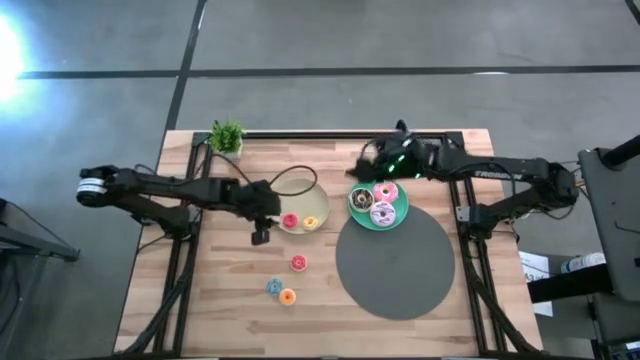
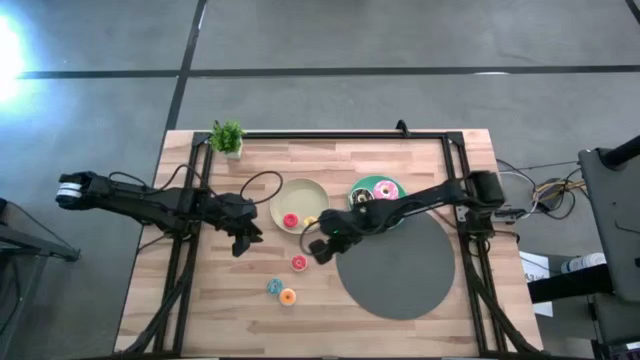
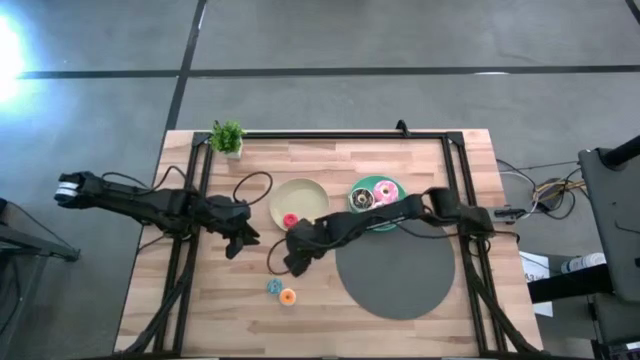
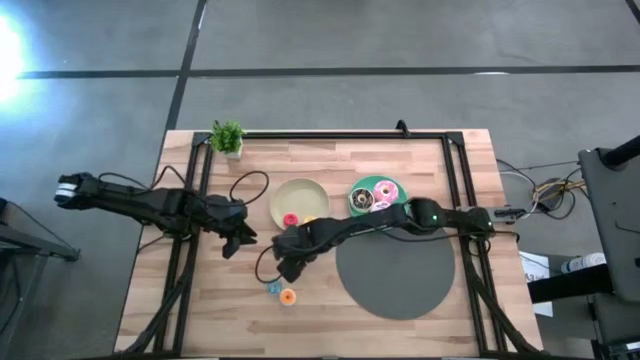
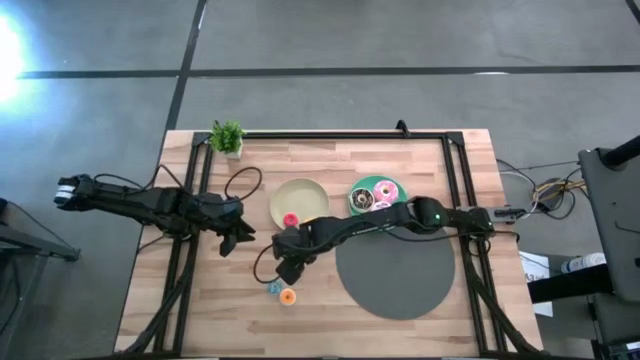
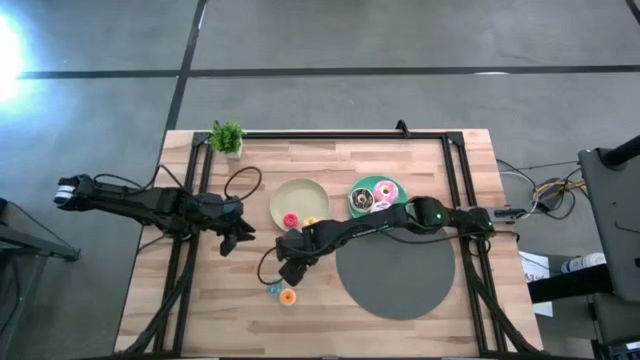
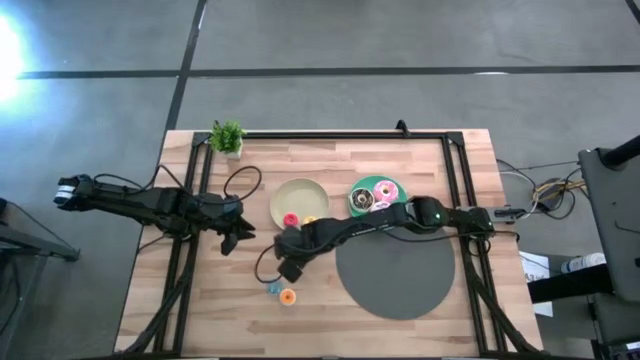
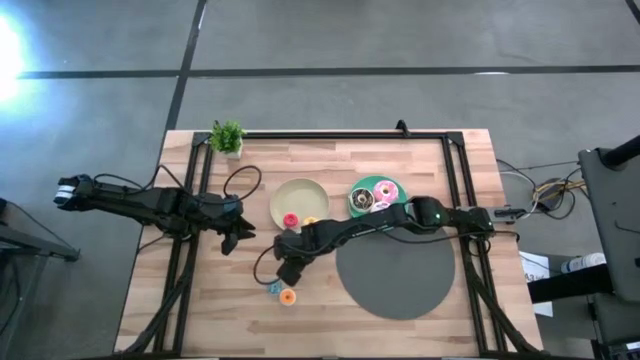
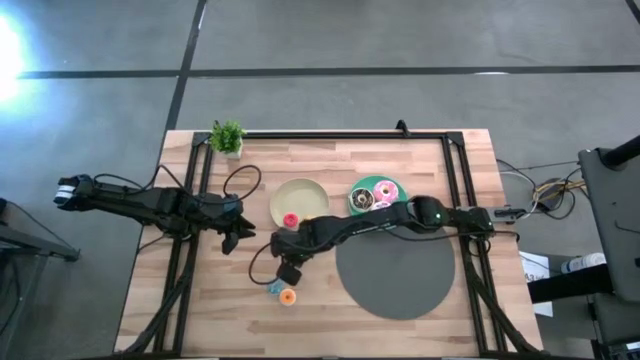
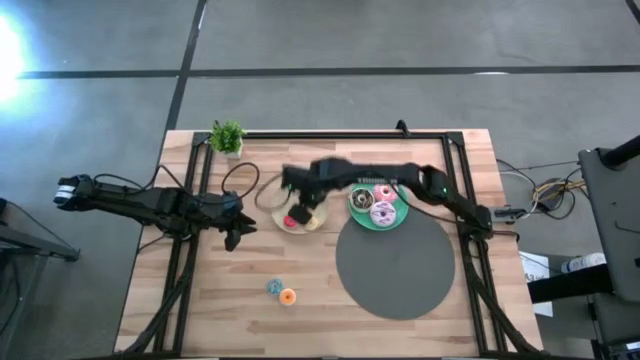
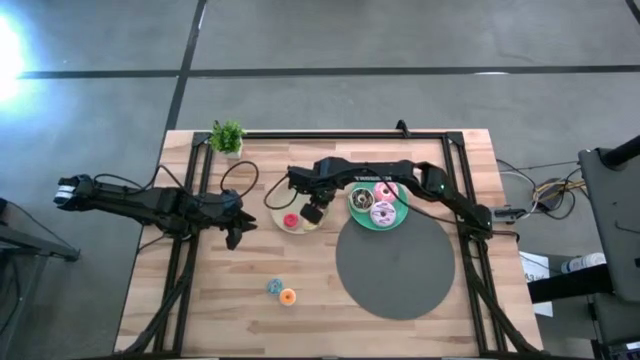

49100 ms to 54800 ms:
Task: Pick & Place donuts
Put the small orange donut on the white plate

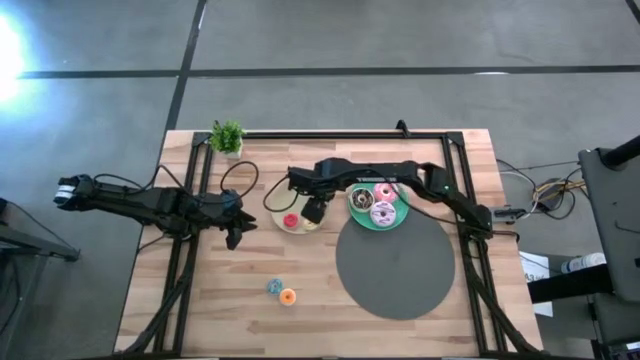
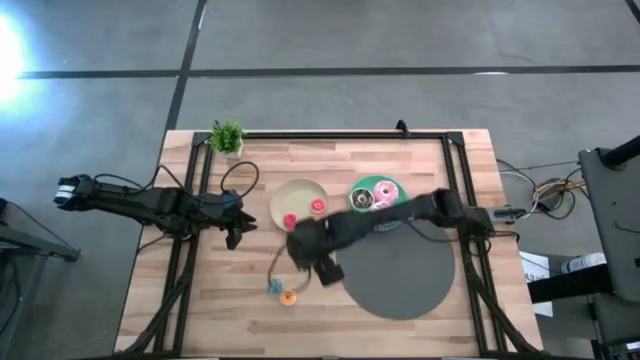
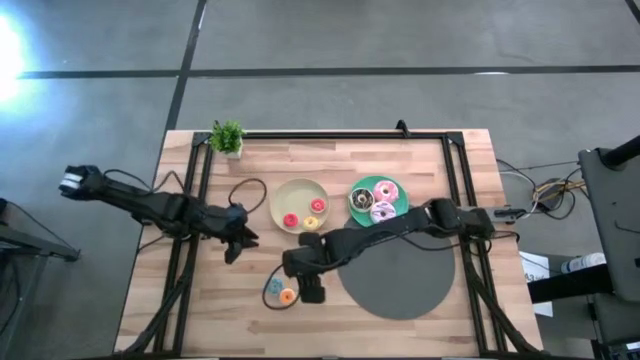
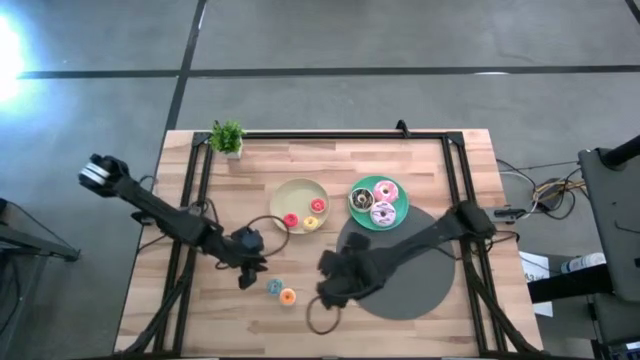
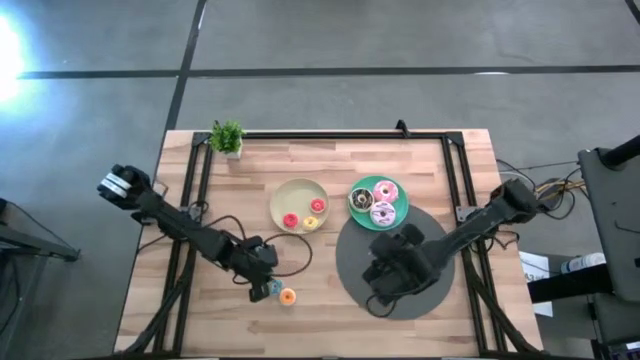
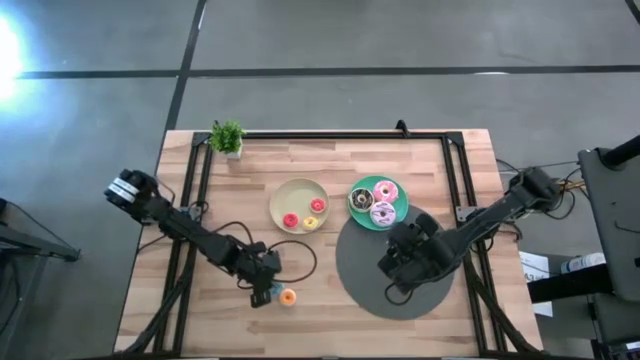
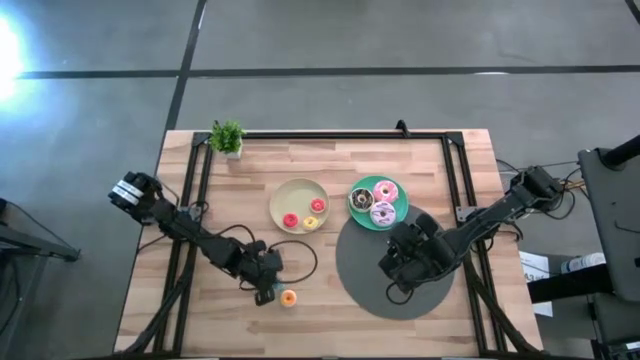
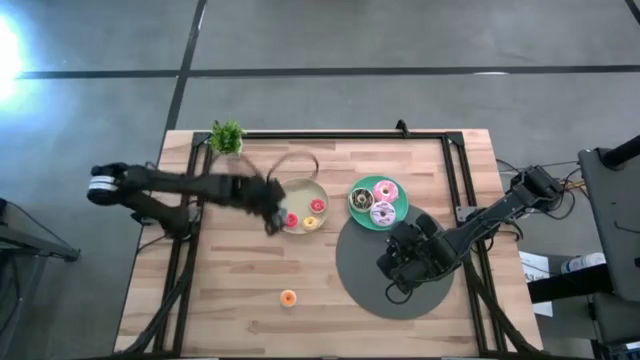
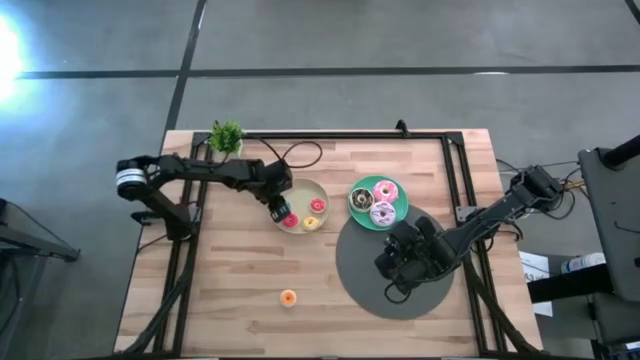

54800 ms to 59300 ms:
Put the small blue donut on the white plate

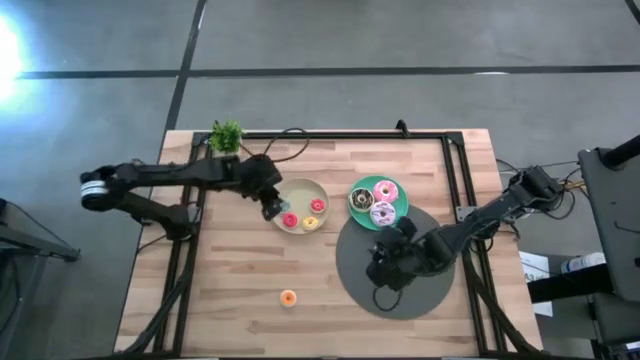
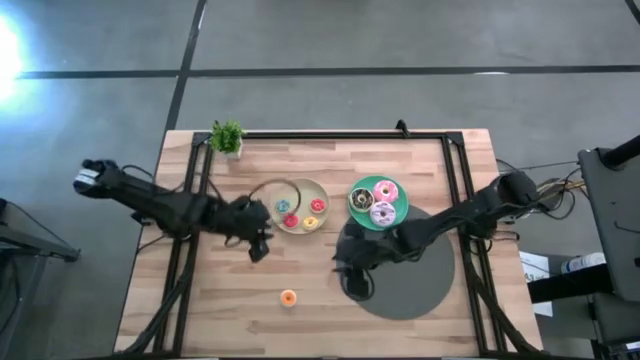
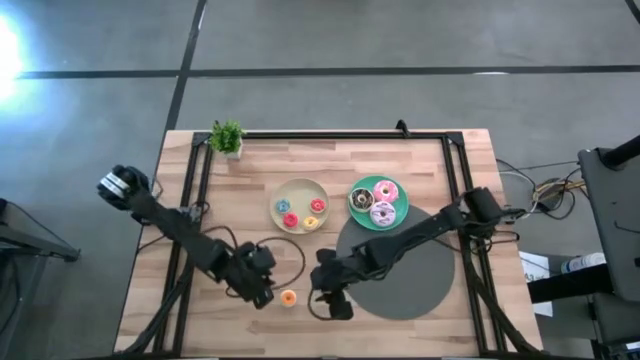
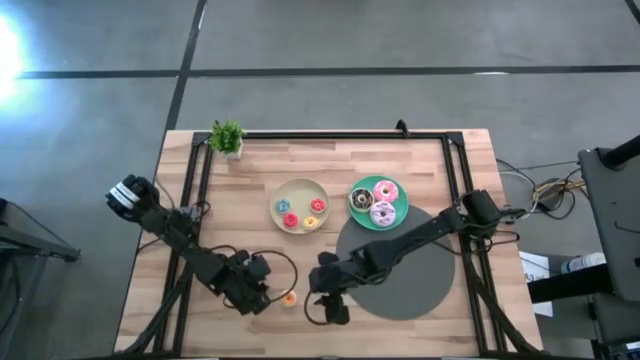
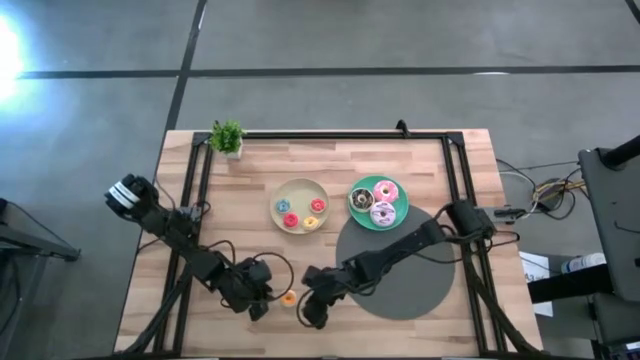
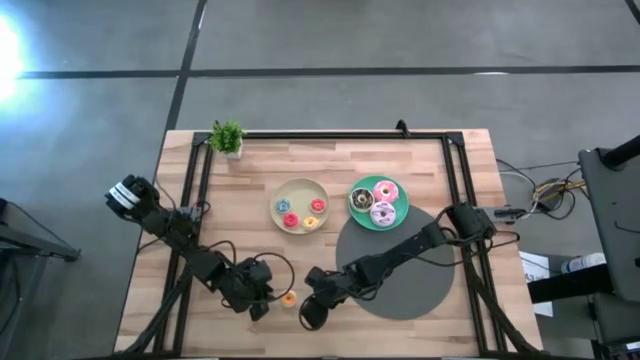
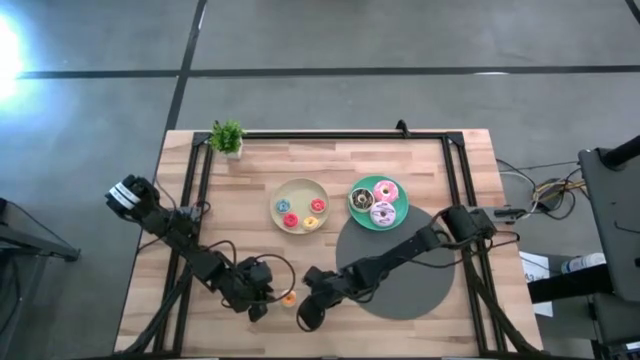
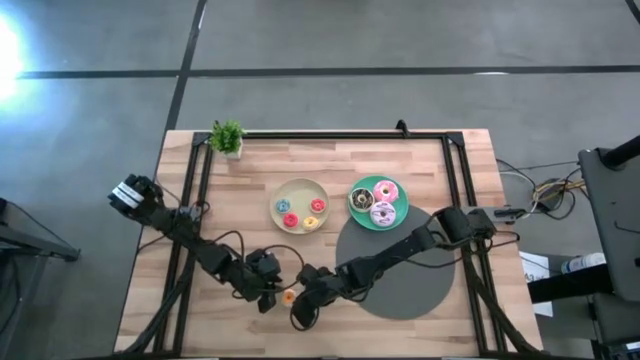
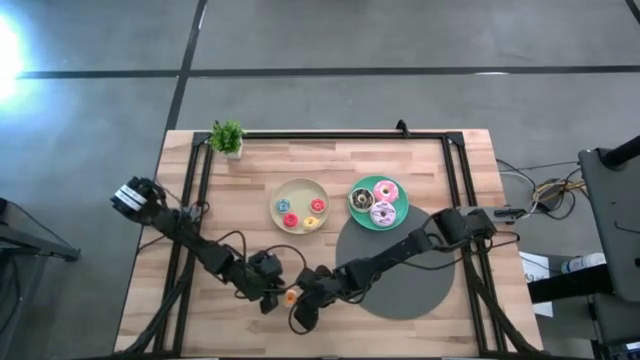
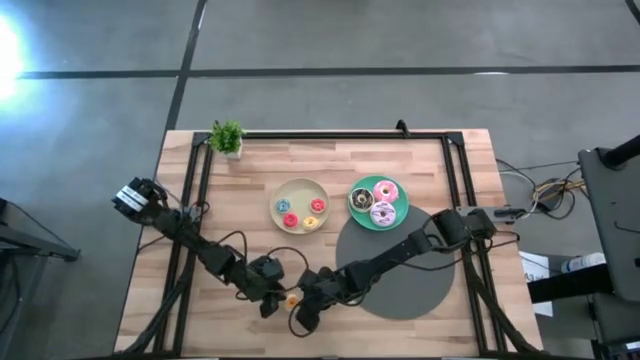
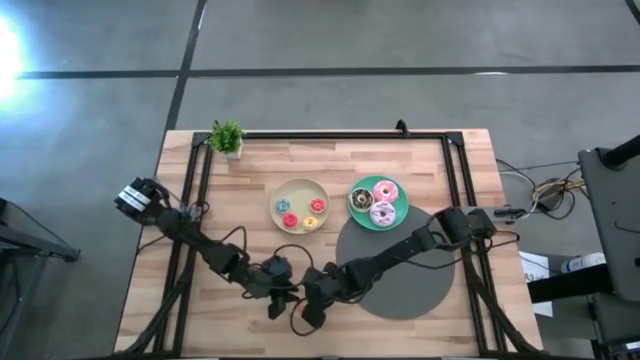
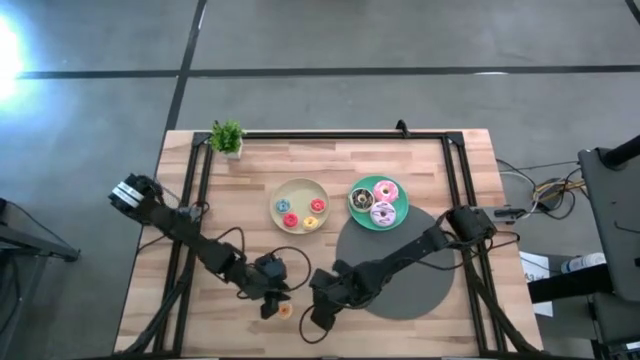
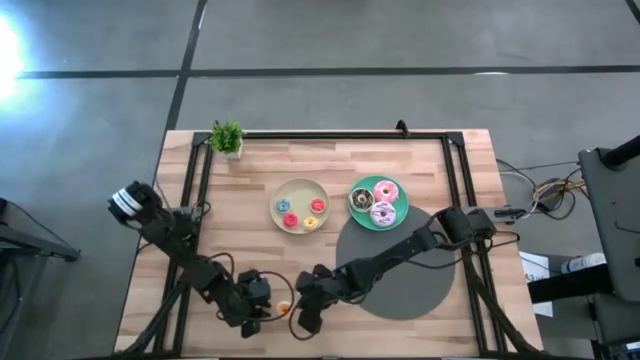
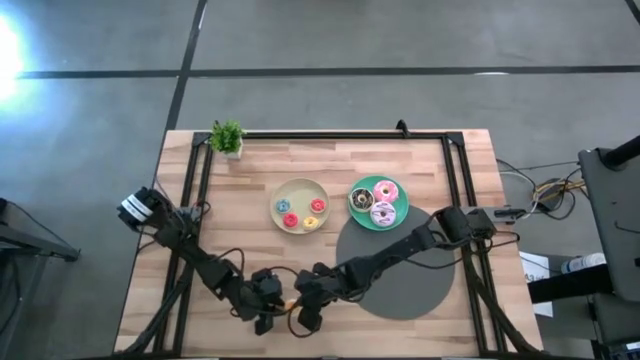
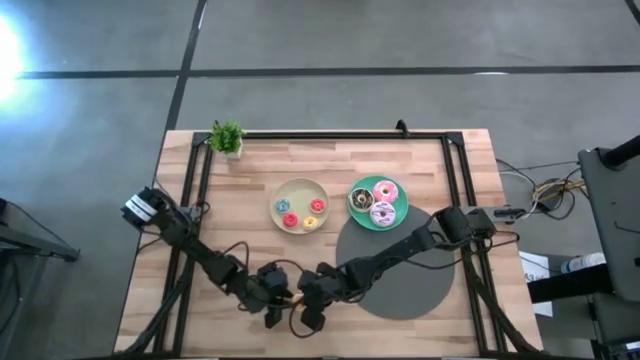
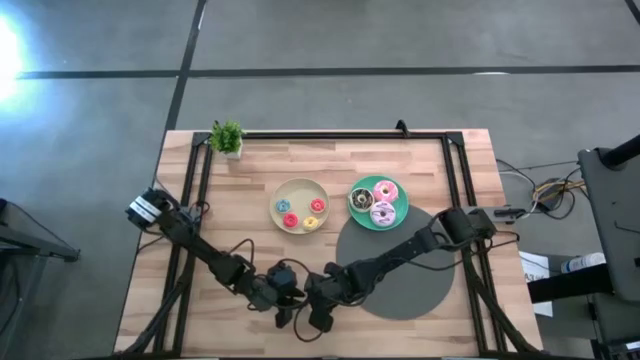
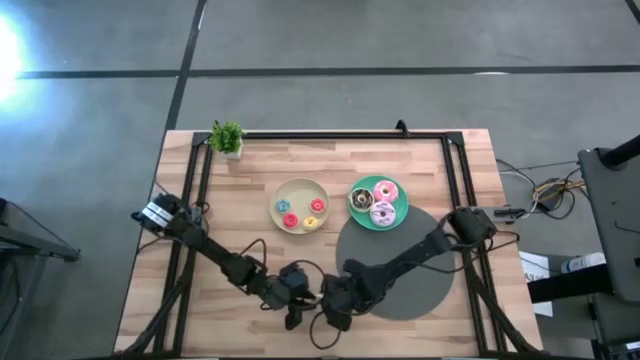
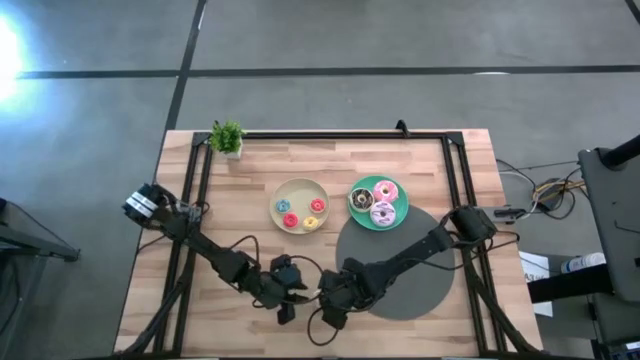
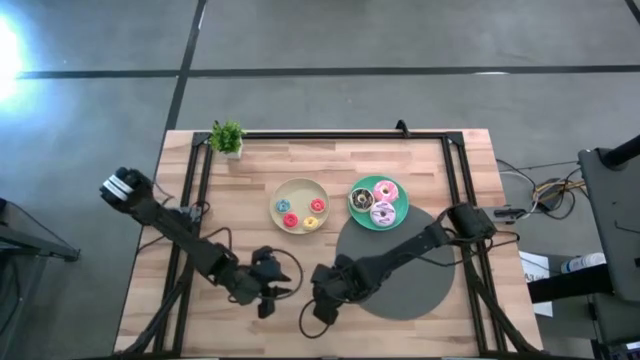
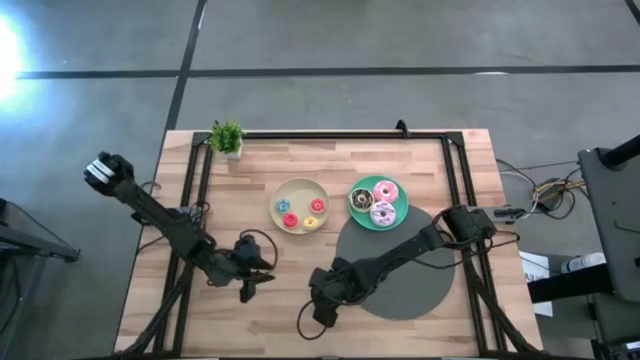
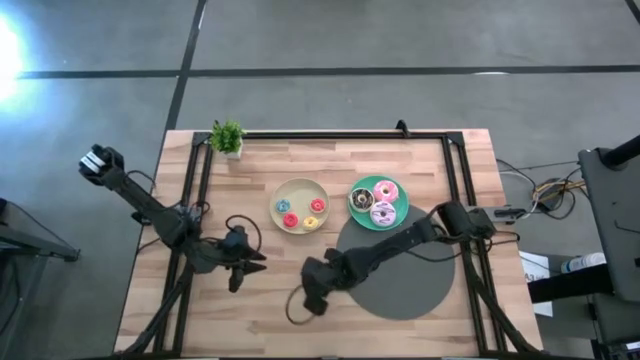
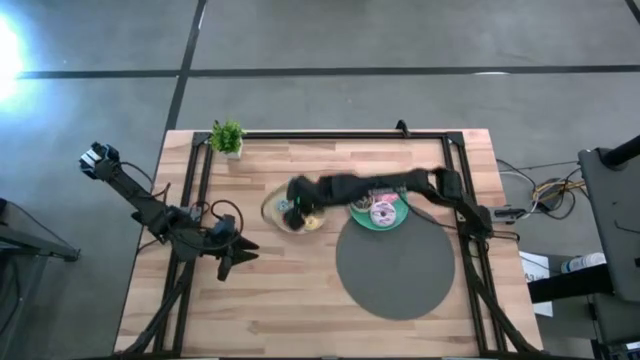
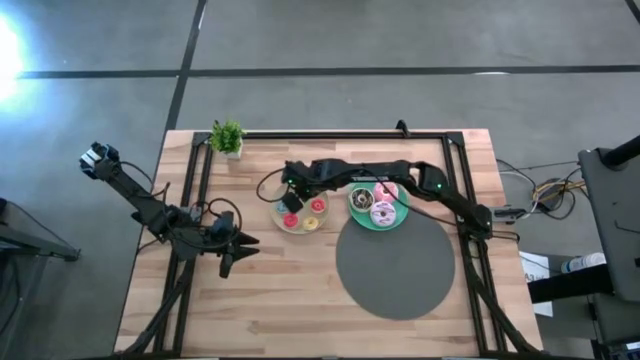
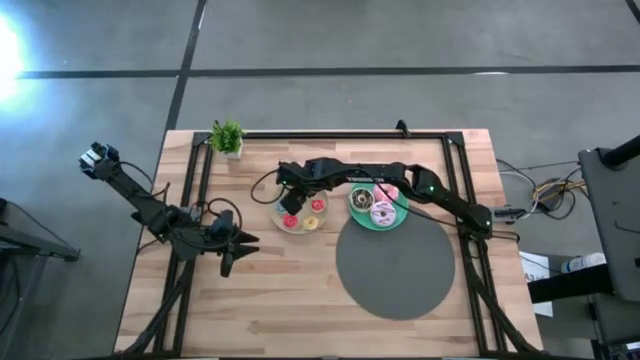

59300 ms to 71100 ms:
Put the small white donut on the white plate
